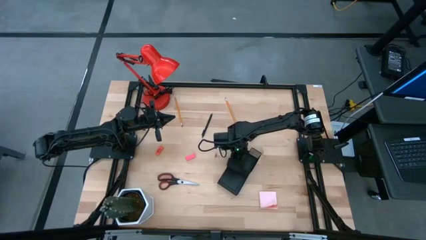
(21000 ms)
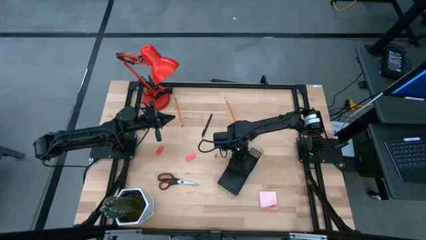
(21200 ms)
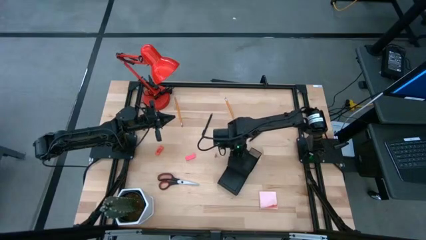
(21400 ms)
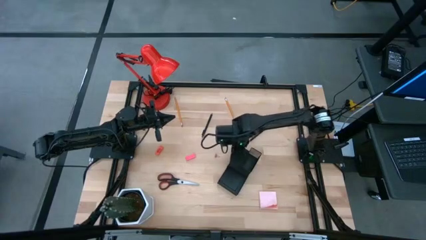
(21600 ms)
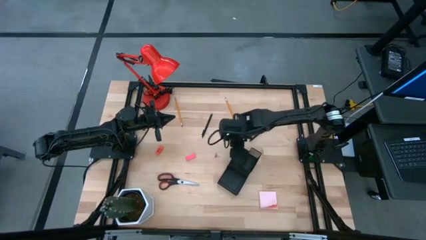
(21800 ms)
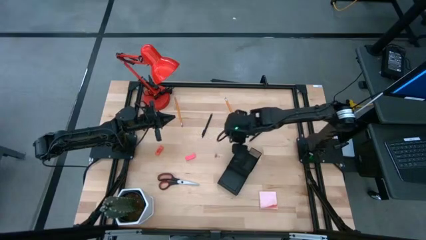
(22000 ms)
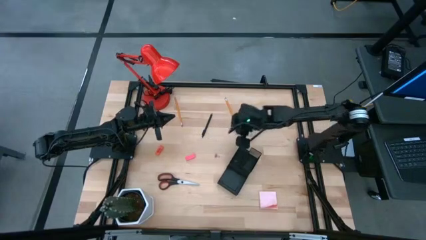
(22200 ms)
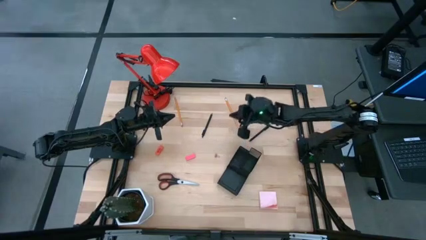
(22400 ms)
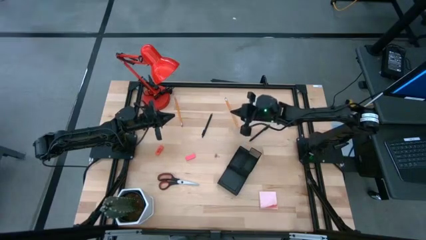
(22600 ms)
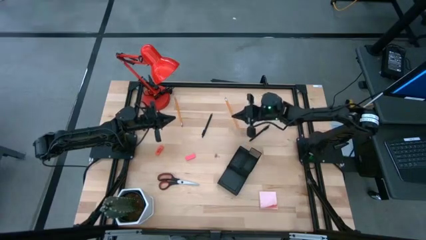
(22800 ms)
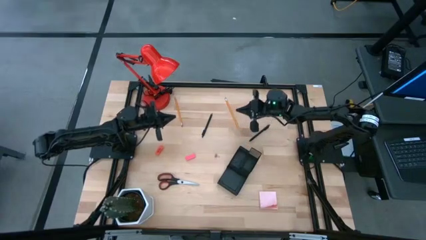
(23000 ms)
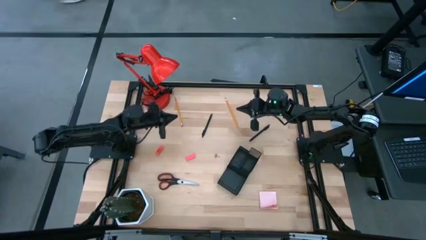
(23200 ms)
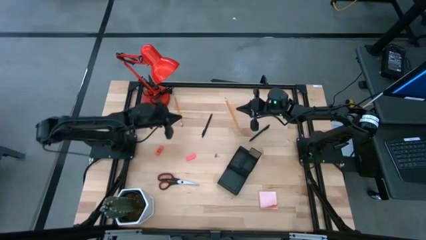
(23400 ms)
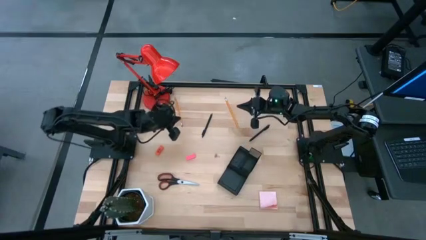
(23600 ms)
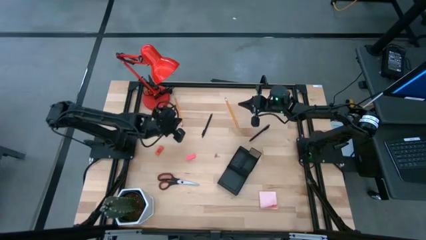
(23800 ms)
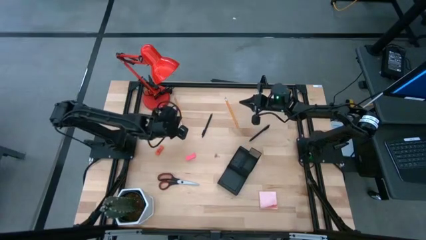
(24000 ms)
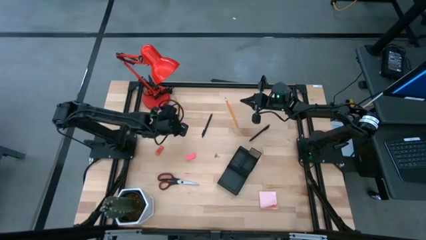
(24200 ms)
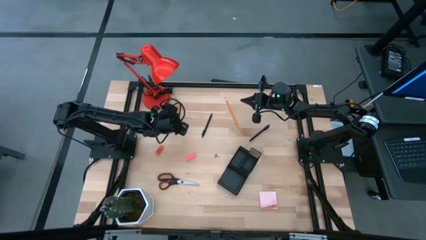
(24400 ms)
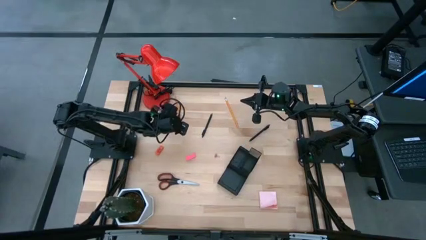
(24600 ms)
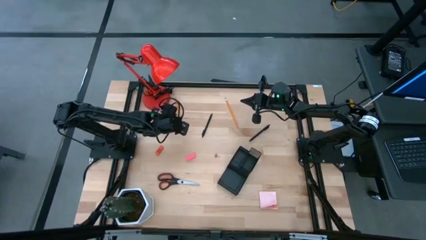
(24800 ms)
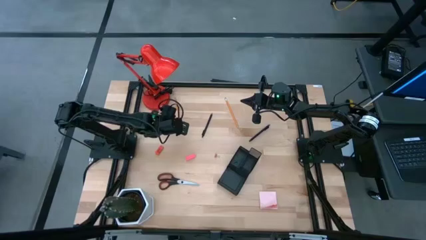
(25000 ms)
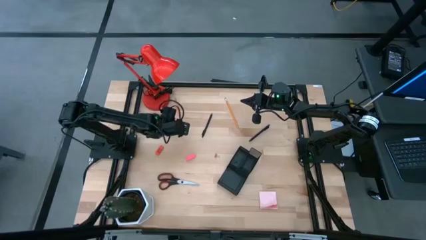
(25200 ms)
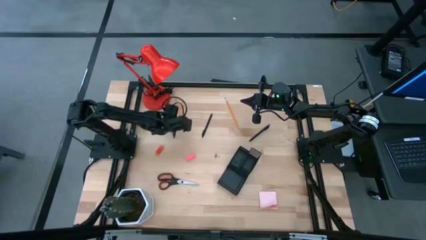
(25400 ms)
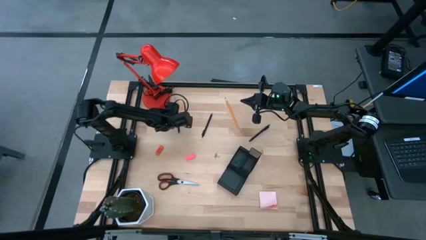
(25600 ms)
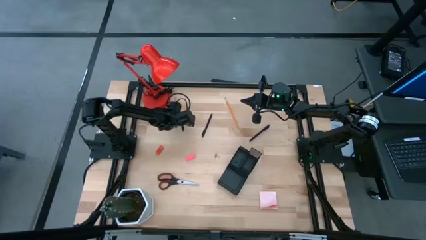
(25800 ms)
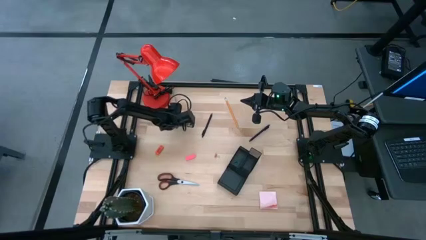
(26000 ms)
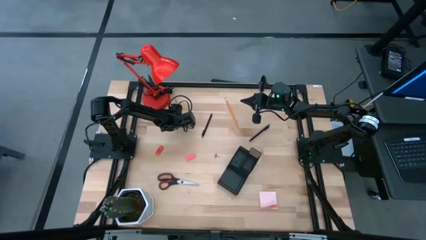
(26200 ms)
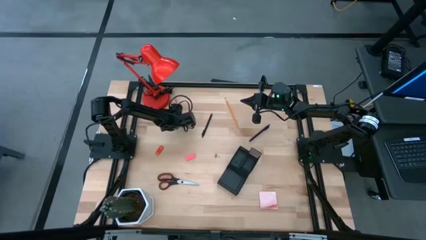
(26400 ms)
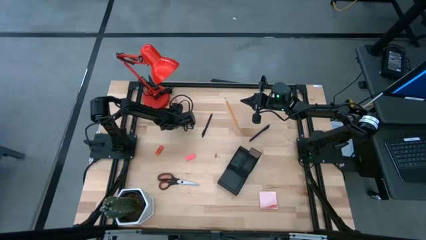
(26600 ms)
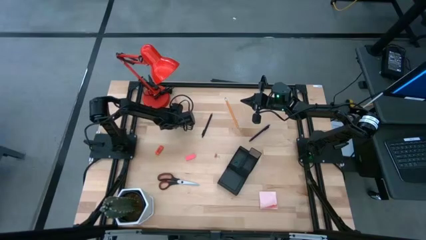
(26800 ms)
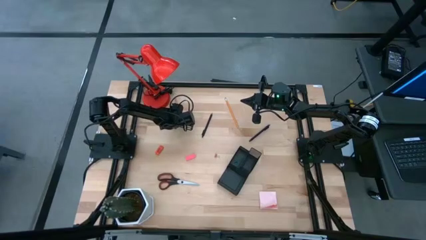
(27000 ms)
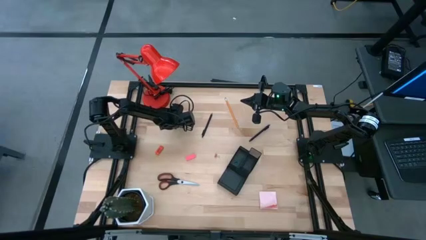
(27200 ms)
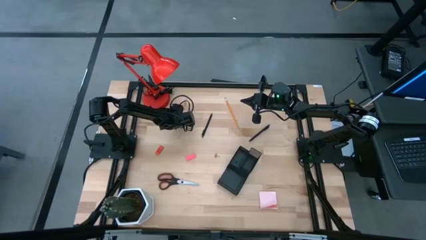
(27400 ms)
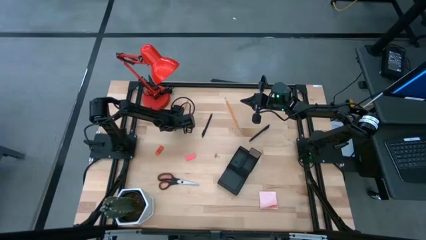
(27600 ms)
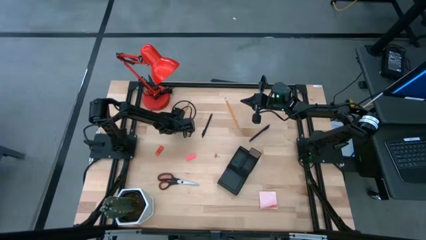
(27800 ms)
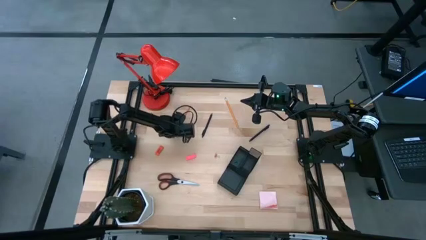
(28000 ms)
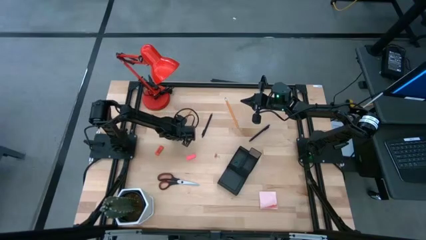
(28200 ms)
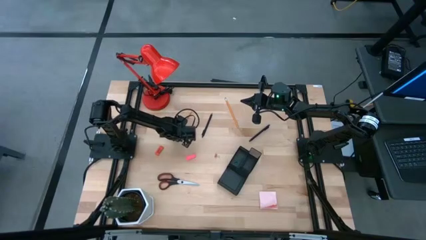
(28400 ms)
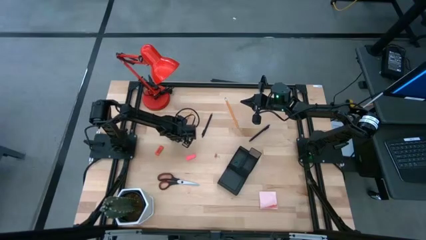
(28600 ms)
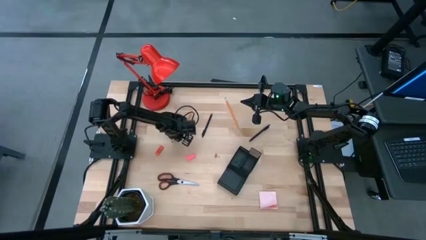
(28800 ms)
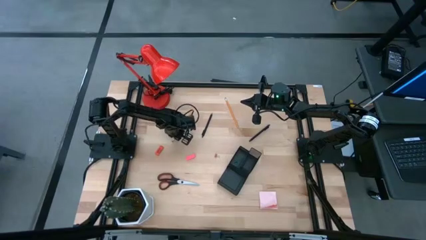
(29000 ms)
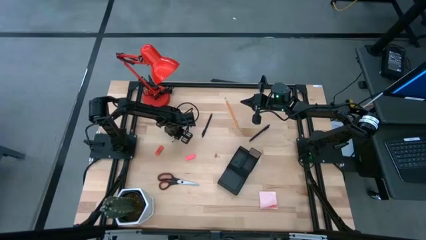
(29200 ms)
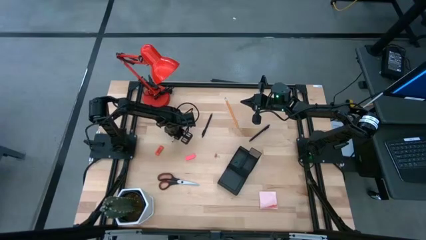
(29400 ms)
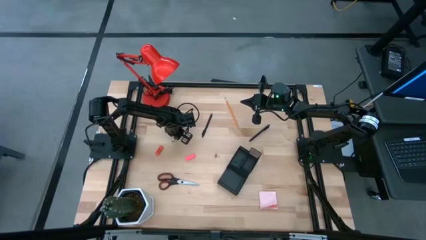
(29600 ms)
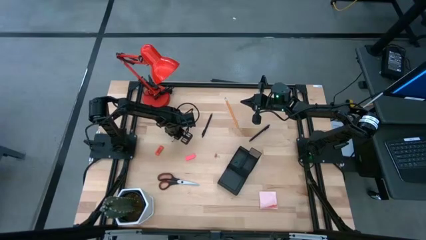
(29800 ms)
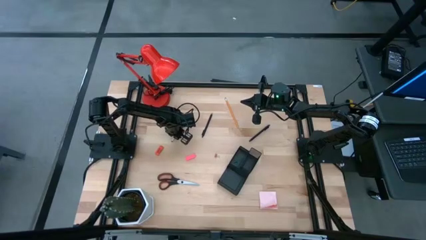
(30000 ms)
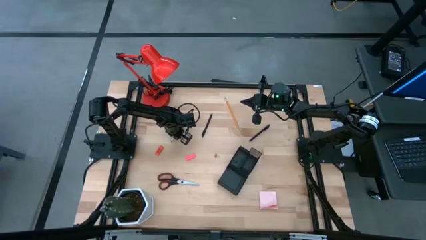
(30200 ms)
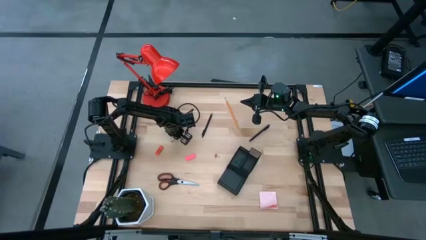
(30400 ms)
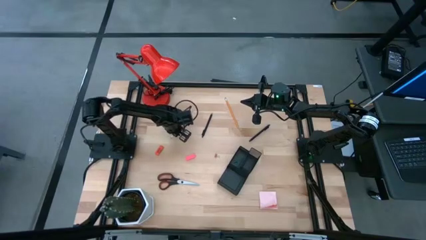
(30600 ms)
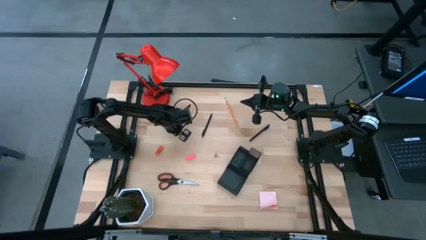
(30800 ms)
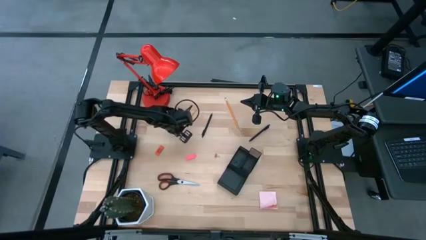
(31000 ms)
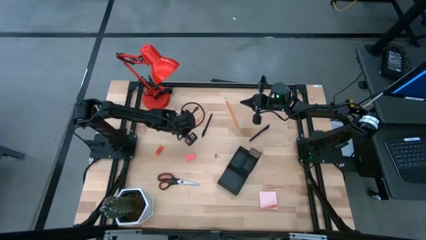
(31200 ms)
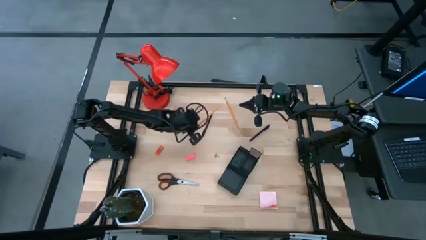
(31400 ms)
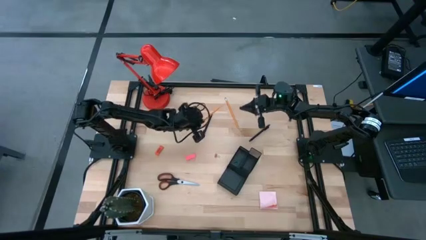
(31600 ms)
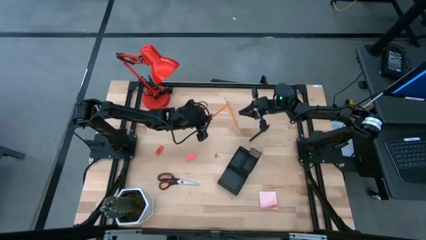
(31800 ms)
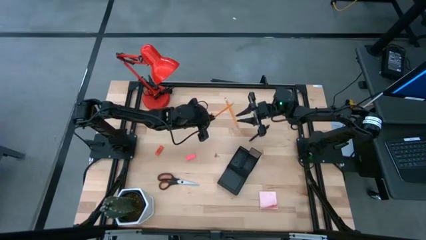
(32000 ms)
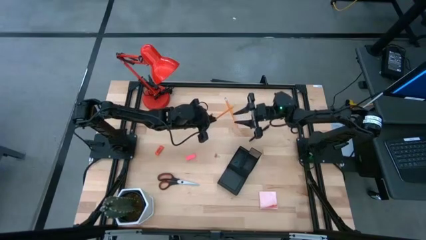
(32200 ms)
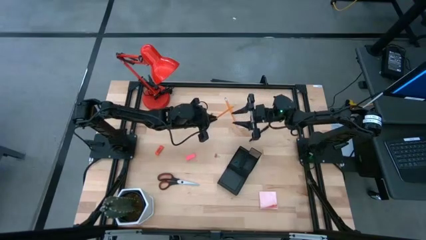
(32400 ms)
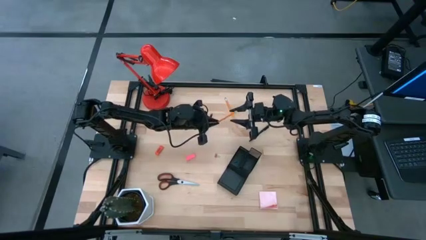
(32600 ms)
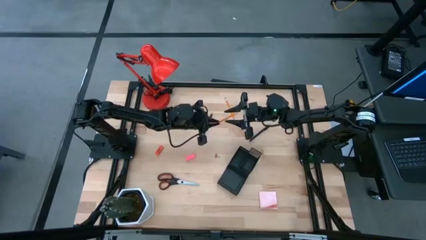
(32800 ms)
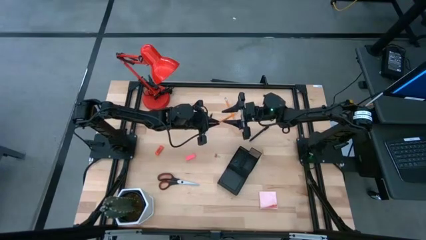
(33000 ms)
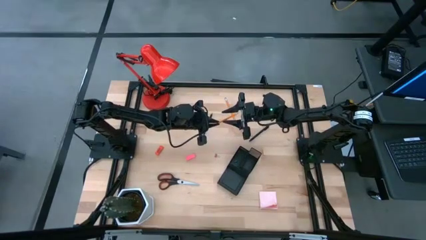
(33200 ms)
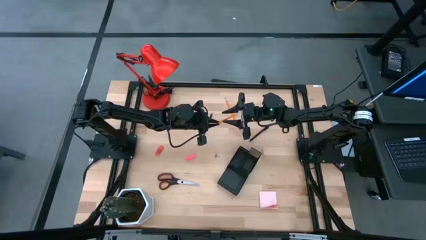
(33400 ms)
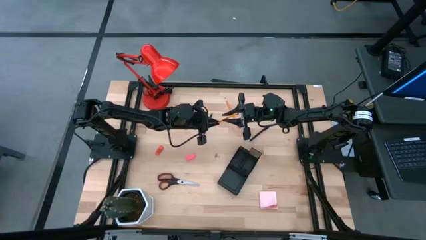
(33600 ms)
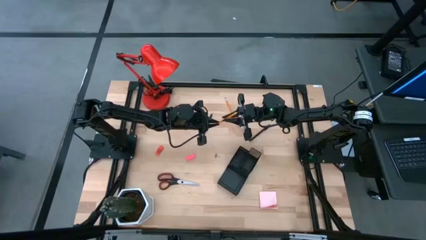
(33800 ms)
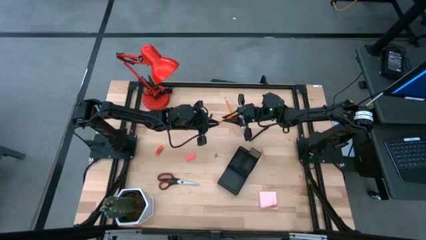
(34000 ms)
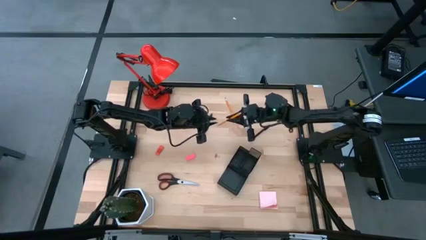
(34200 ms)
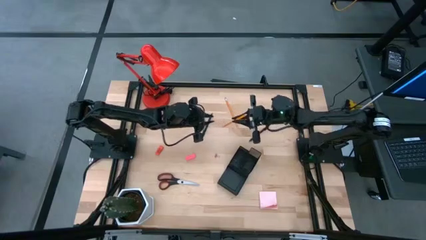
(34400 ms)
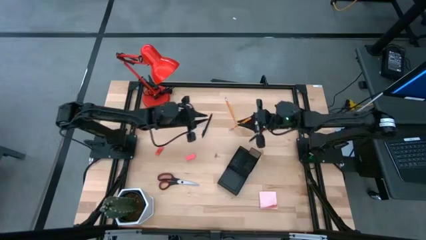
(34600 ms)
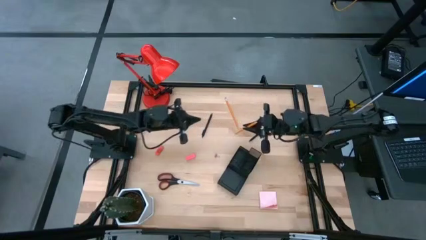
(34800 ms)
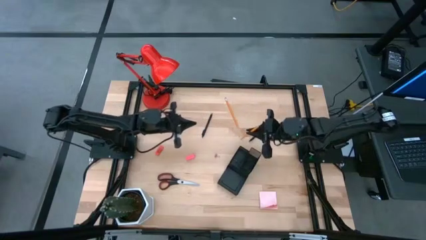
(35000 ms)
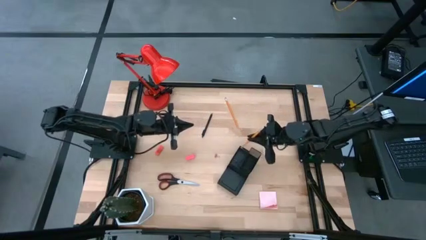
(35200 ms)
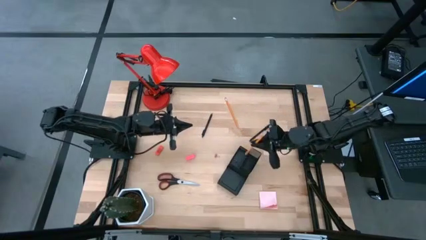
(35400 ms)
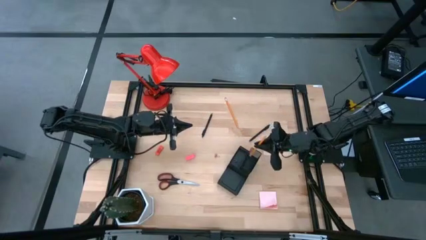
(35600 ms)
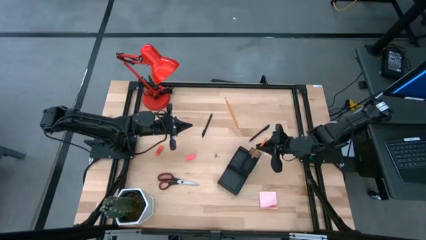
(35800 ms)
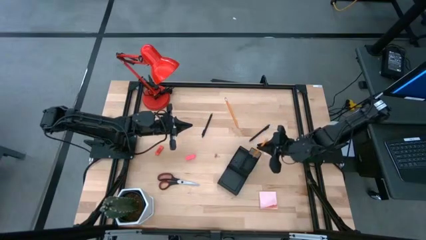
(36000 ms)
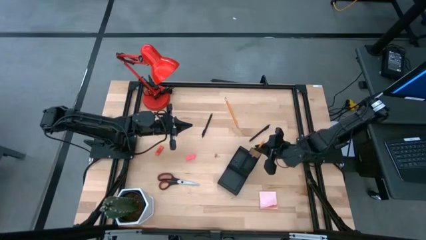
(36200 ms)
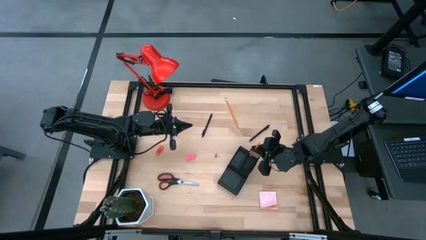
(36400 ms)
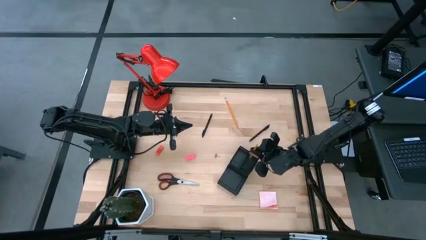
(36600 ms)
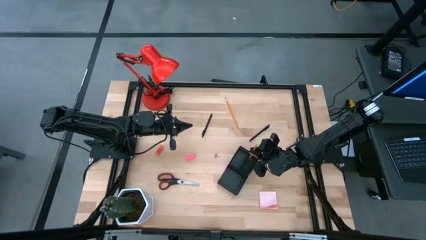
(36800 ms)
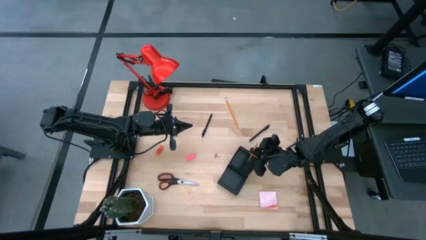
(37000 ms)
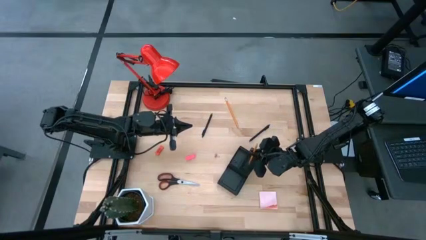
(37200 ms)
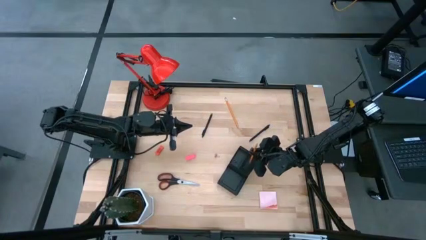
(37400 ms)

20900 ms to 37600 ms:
Task: Pick and place office supplies into organizer
Put the left pencil into the desk organizer
